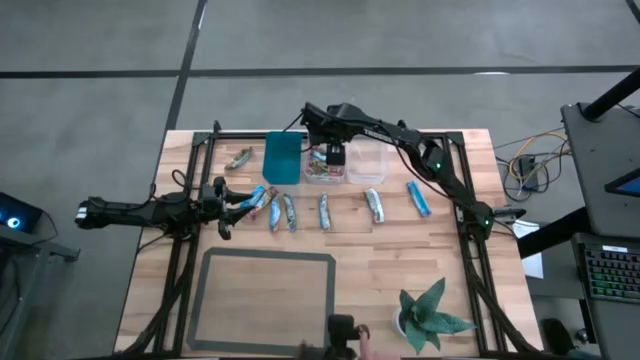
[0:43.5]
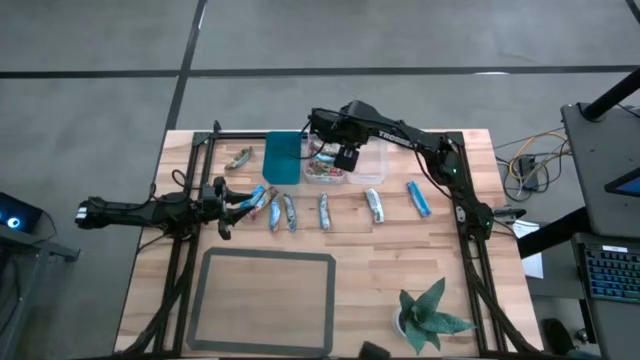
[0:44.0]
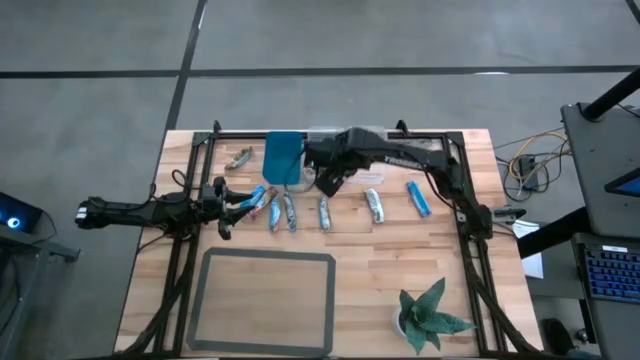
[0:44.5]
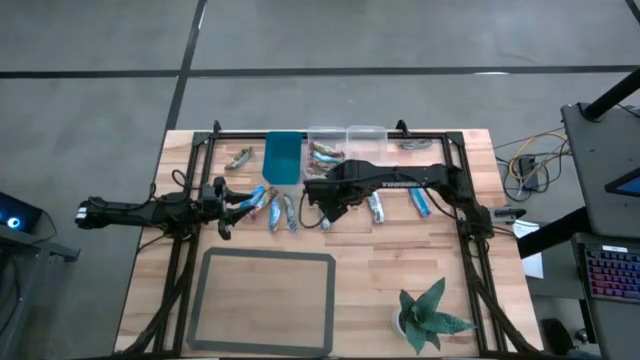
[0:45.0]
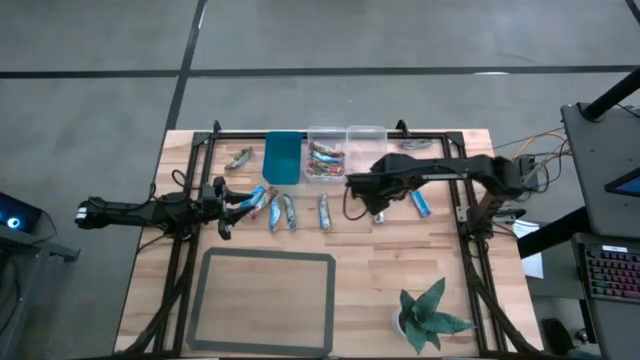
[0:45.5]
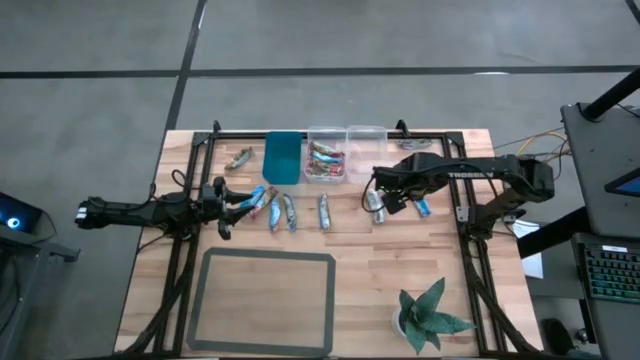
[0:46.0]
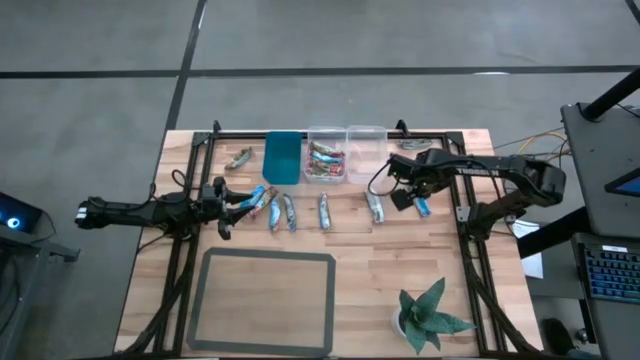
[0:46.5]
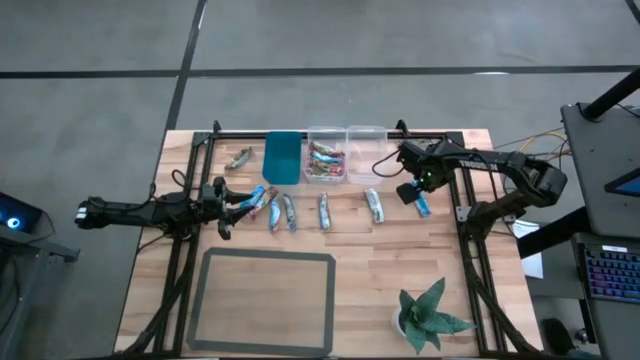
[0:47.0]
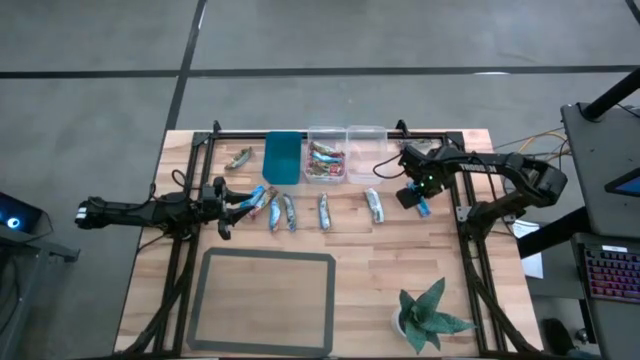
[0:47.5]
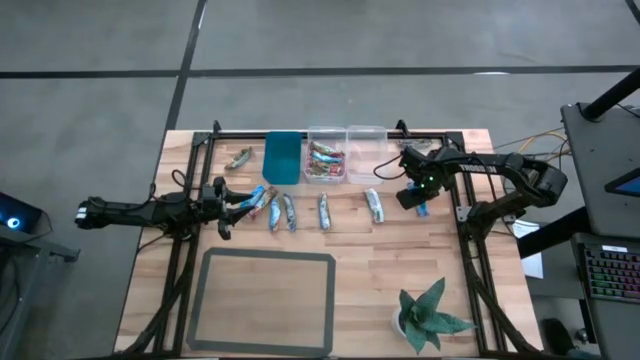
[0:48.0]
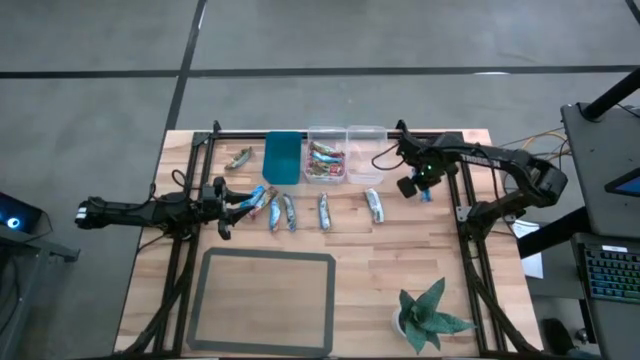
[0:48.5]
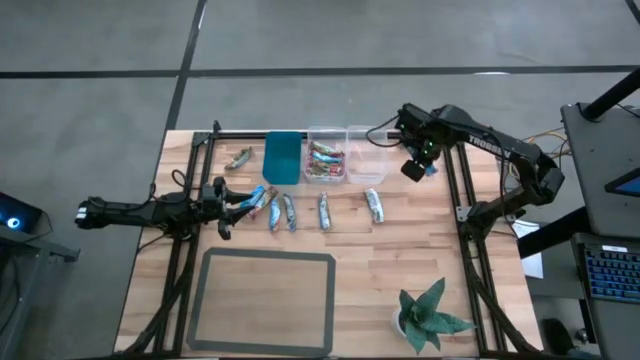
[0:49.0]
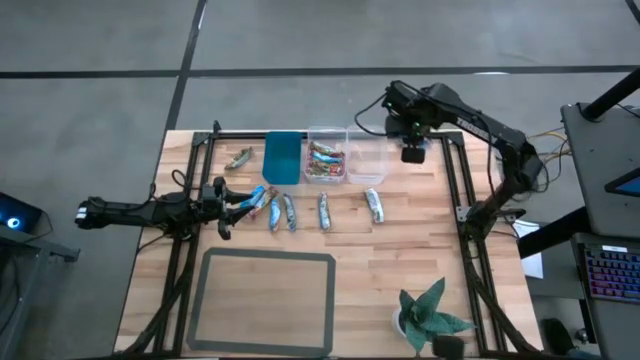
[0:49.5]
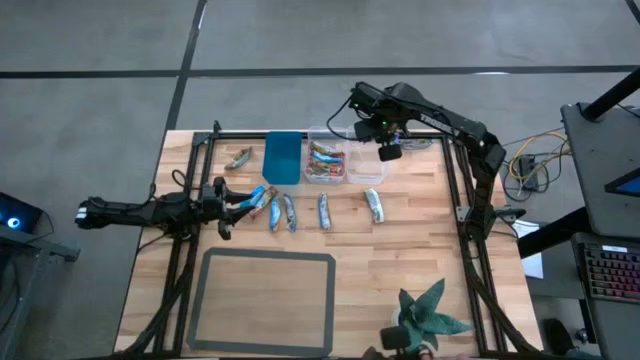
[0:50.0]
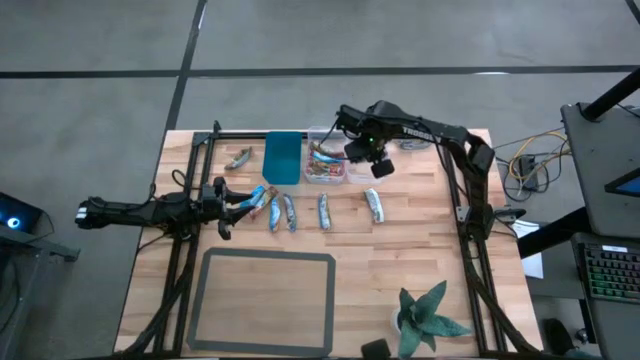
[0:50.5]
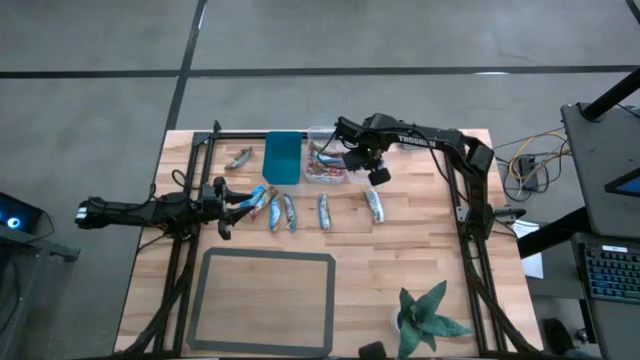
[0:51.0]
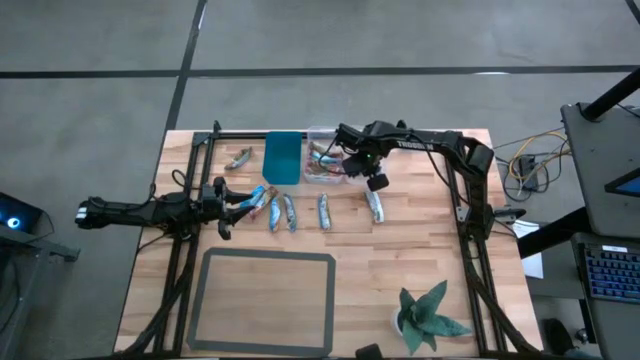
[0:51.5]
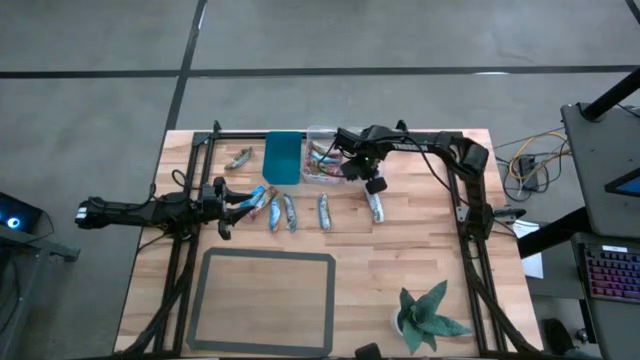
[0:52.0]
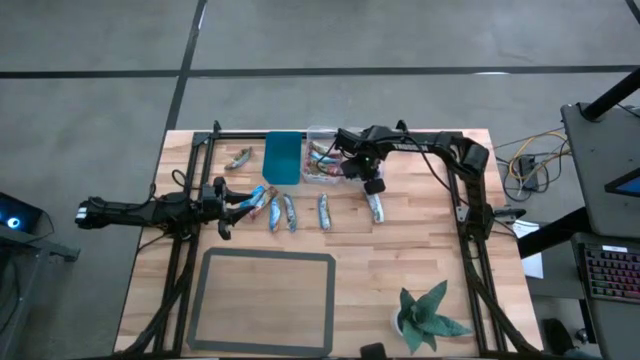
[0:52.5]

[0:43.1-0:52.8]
Task: Pick and place Granola Bars by type
Put the bottom right blue granola bar into the right transparent bin

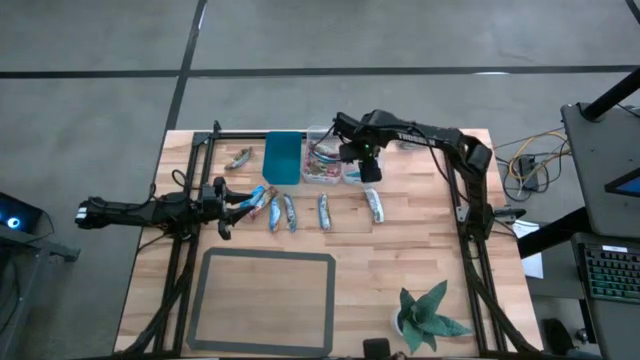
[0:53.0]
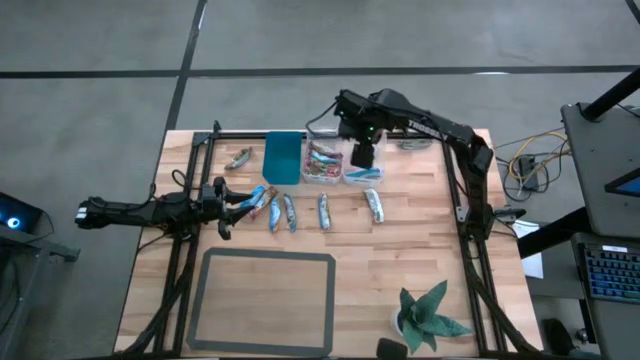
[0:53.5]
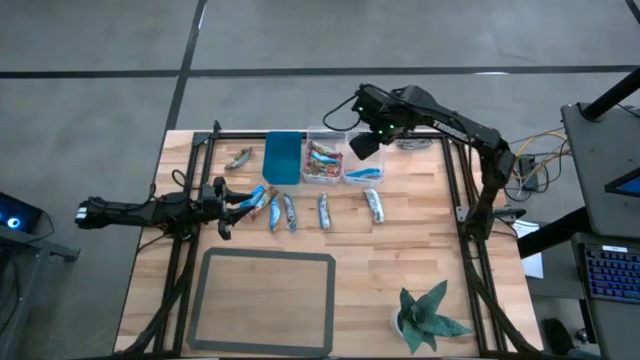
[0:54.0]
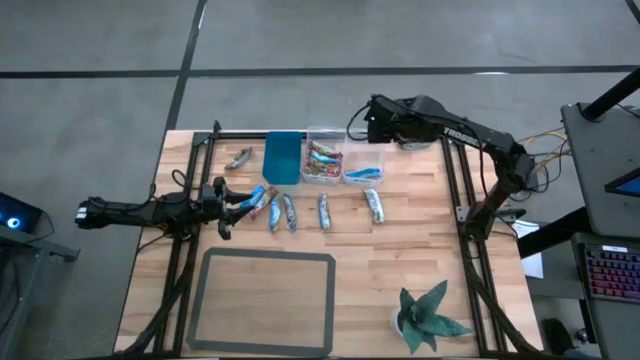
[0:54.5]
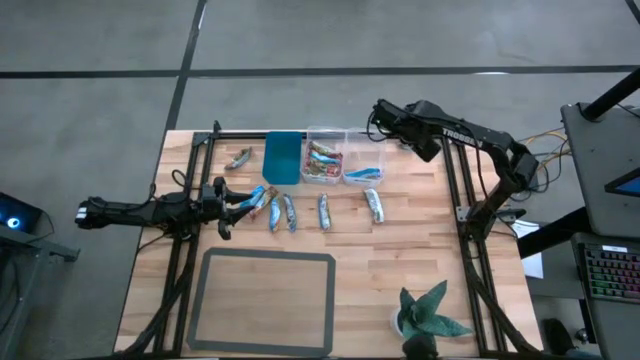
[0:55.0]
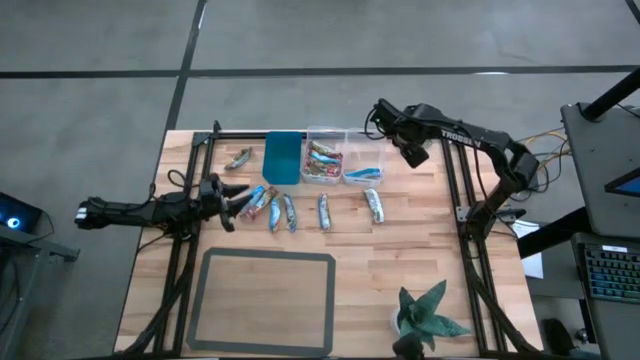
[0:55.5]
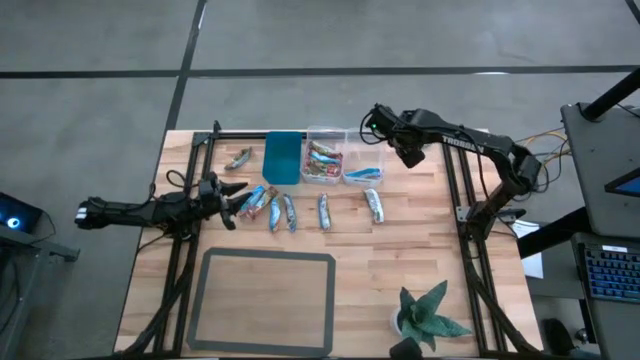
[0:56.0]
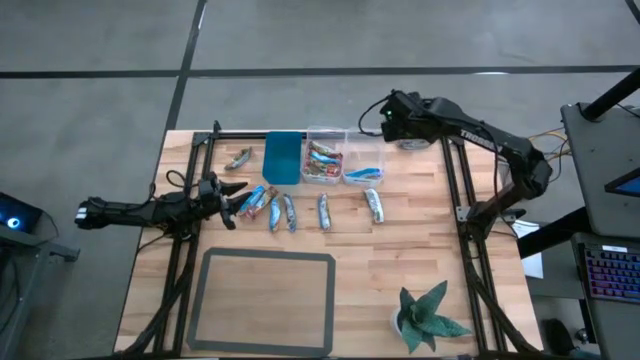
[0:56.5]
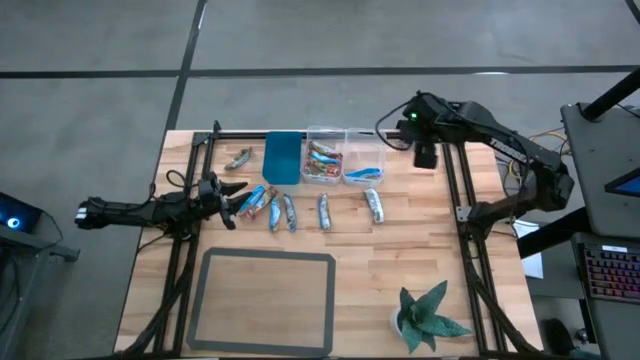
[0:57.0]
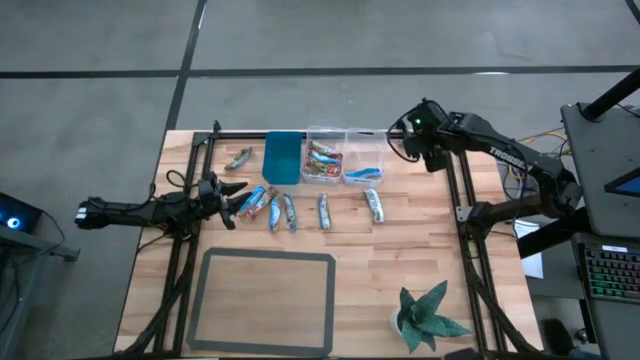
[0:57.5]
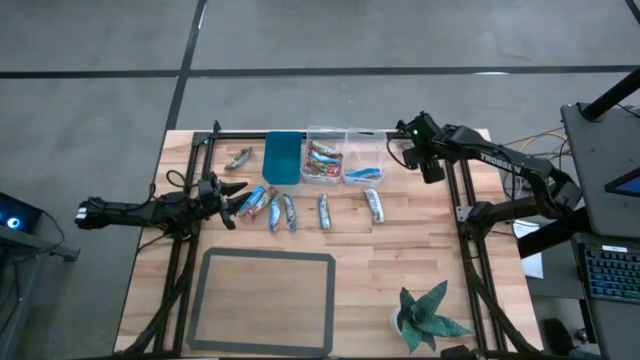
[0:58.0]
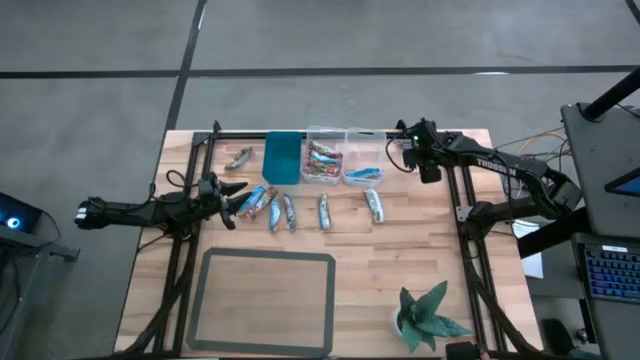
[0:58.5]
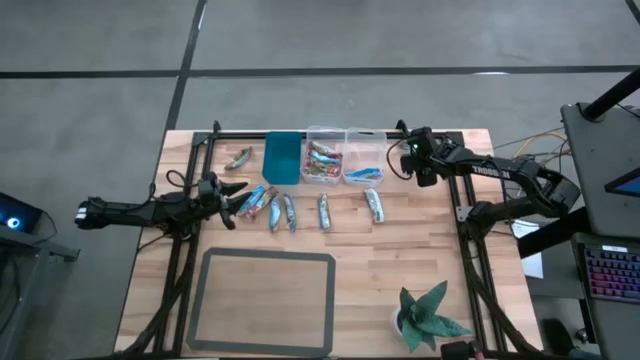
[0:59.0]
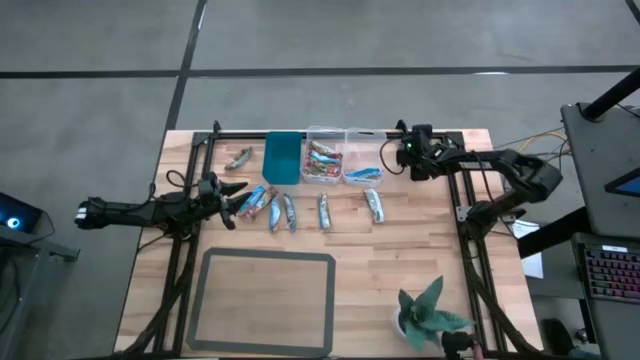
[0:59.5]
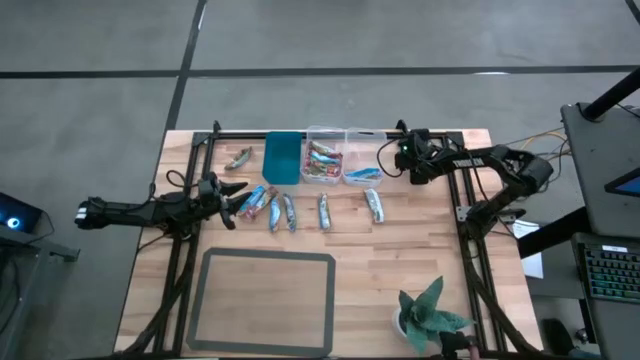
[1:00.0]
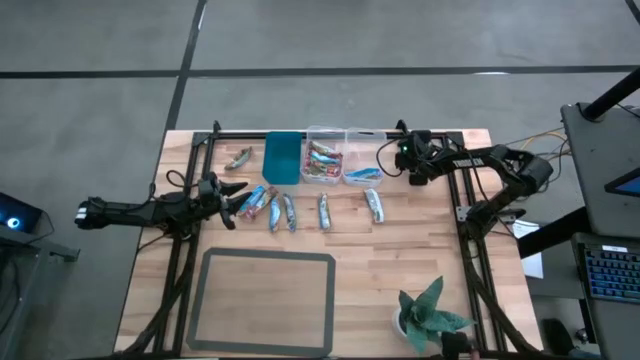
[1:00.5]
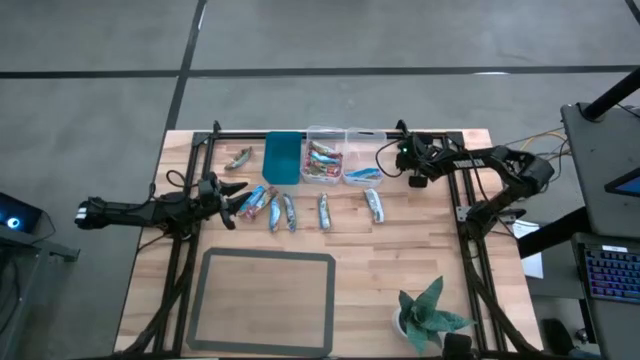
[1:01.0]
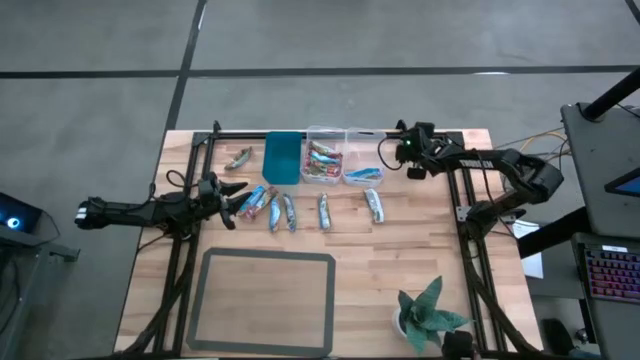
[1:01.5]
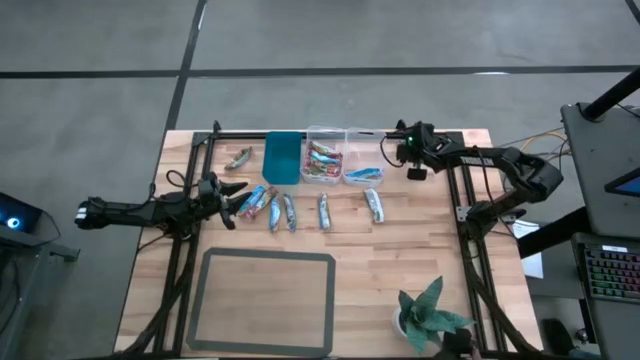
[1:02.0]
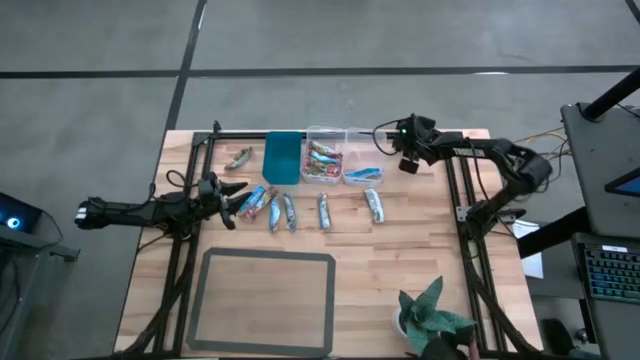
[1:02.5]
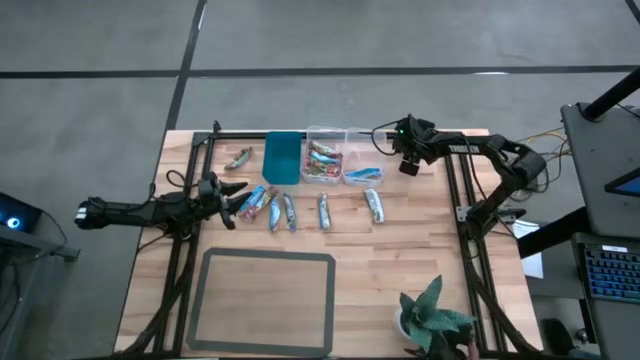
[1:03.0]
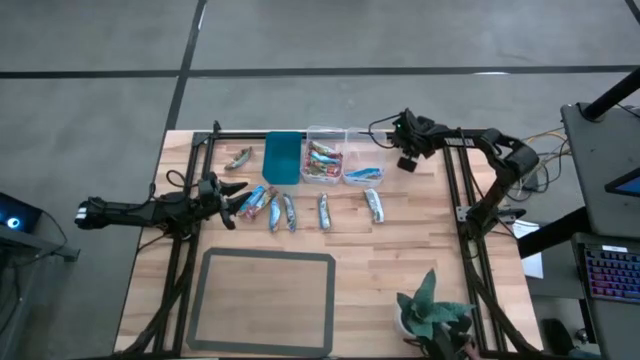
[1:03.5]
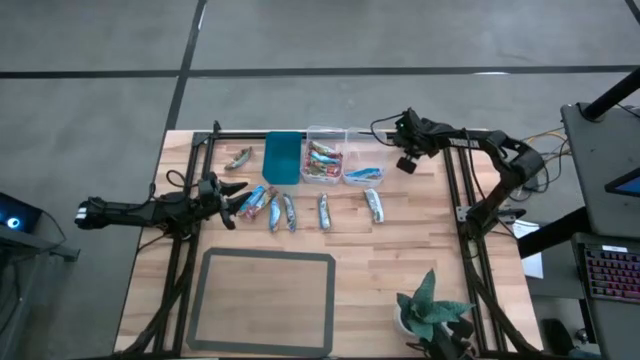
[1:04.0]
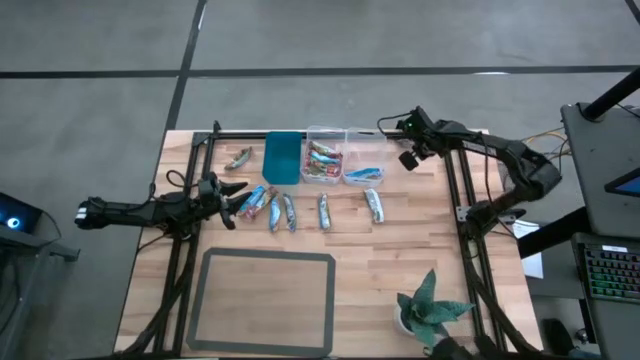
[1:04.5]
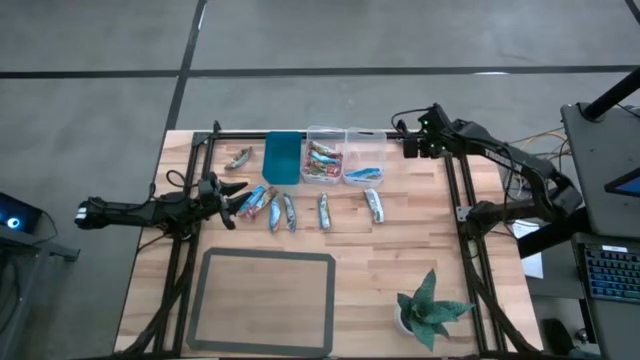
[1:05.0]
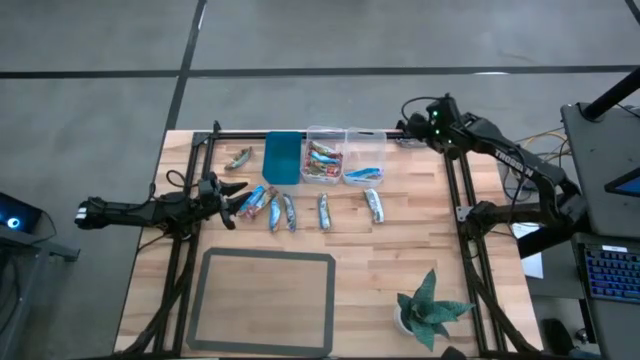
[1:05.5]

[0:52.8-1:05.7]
Put the top blue granola bar into the right transparent bin
